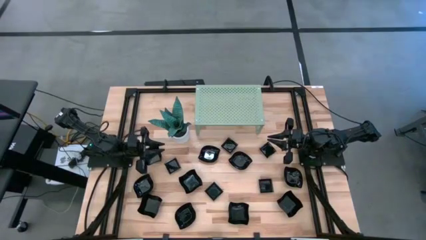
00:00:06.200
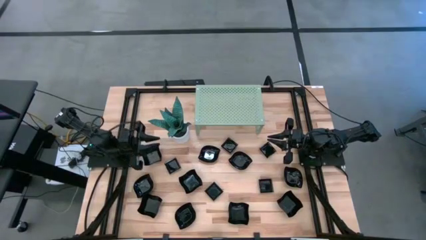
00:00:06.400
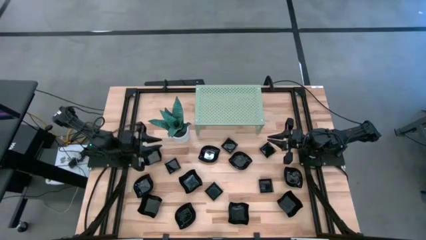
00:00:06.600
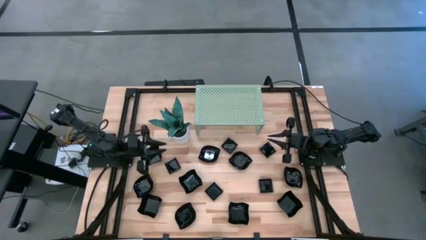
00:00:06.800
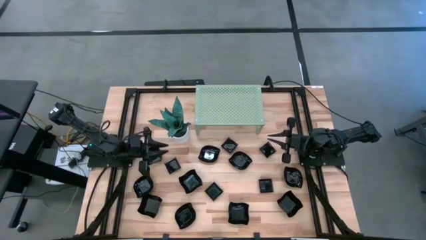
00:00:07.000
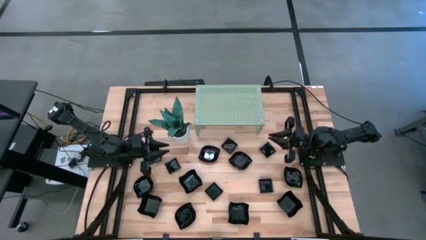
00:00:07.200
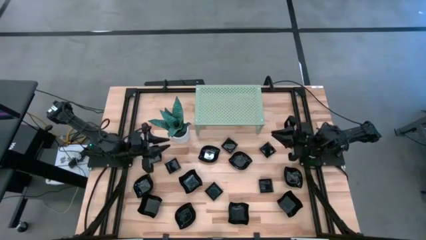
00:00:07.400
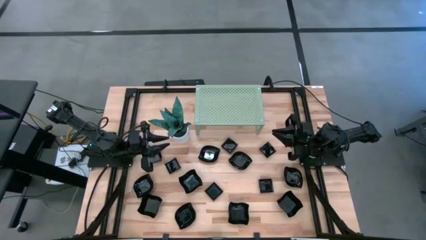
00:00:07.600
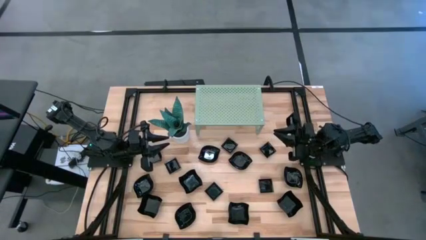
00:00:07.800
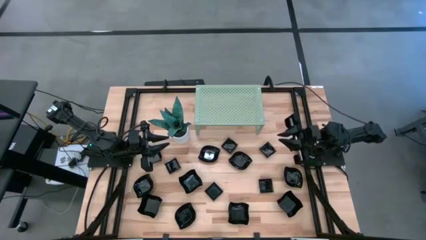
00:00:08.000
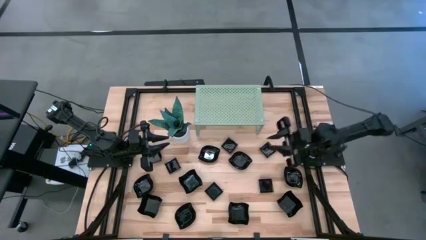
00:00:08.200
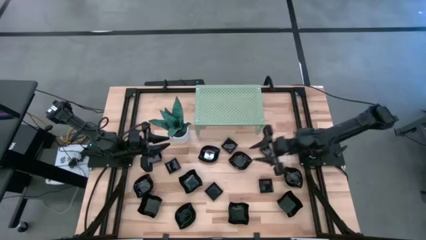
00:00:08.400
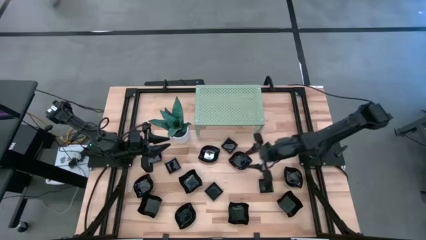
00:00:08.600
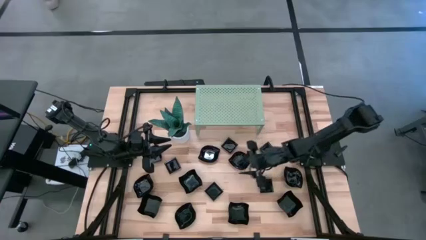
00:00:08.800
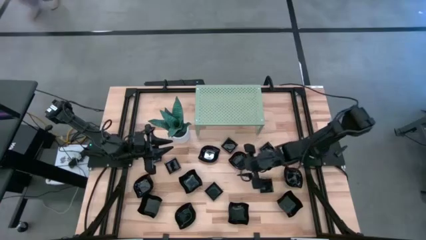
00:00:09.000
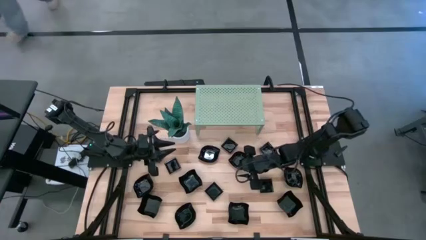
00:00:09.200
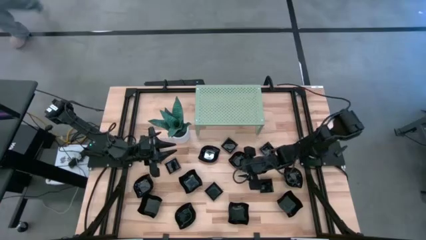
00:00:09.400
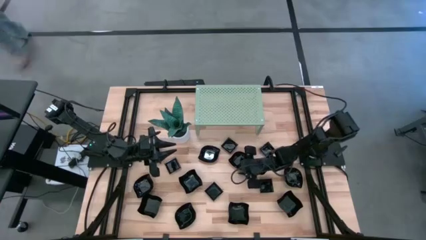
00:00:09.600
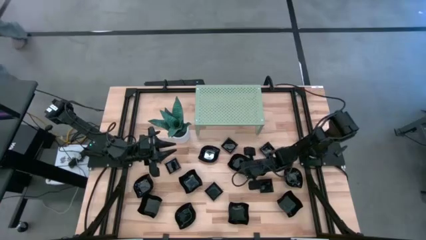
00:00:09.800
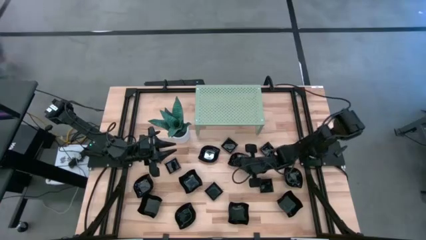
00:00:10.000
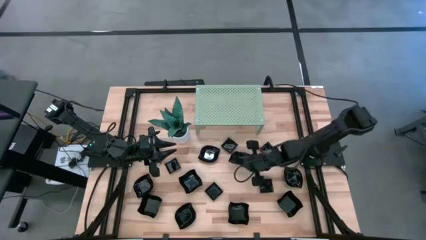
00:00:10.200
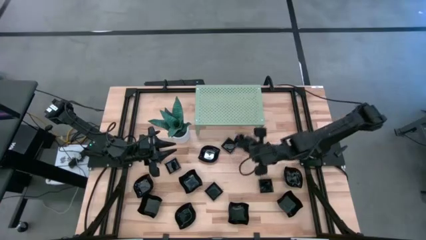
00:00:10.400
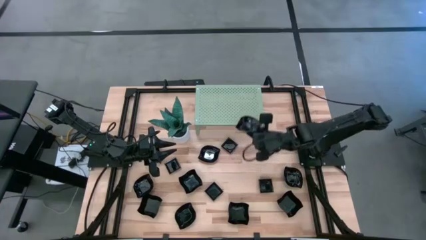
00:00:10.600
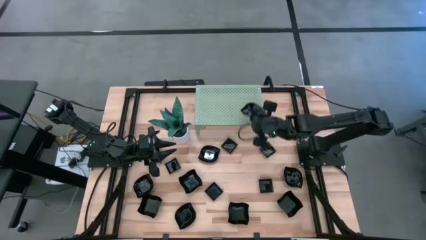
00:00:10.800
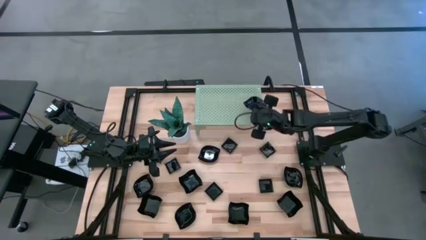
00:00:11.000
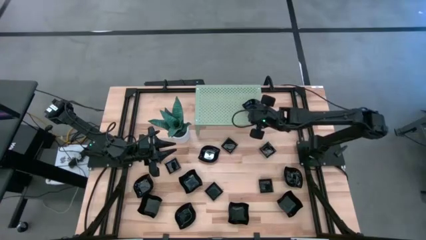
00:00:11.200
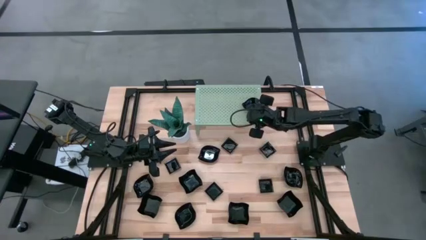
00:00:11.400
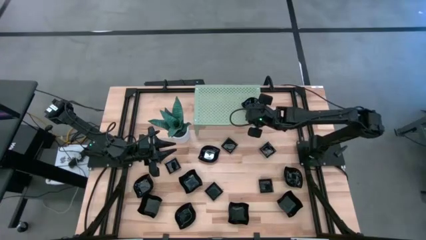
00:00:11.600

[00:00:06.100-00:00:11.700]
Task: Pick & Place Mini shaped plates
Put the leaf-shaped plate on the shelf

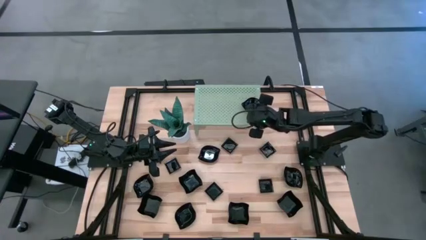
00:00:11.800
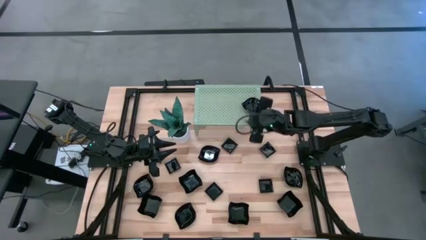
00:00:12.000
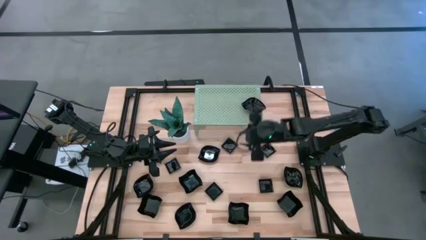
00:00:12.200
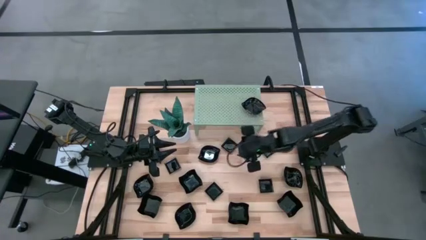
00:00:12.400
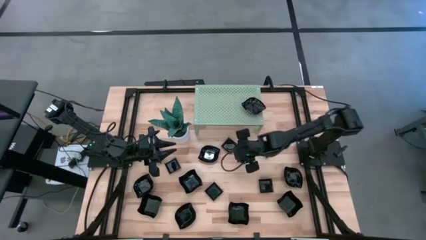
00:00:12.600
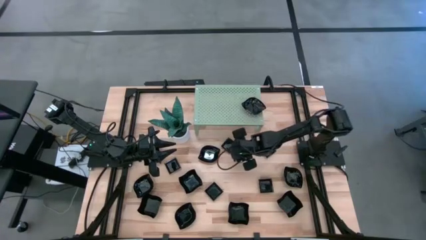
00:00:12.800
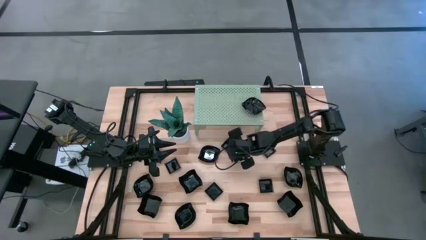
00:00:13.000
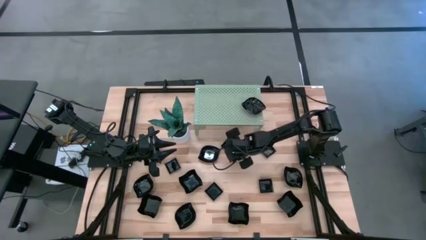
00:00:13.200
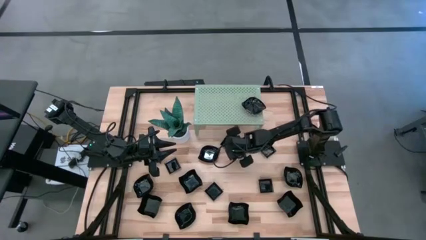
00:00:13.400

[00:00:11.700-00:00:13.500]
Put the square plate on the shelf

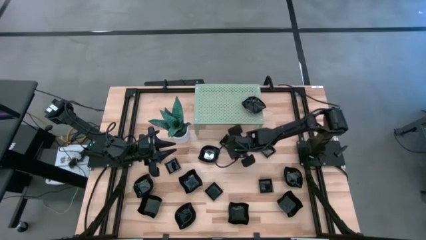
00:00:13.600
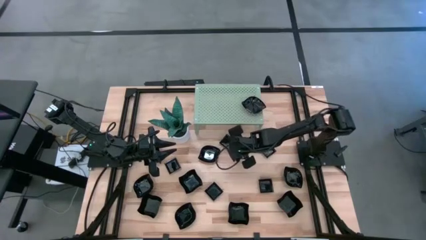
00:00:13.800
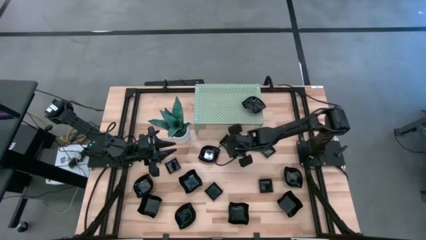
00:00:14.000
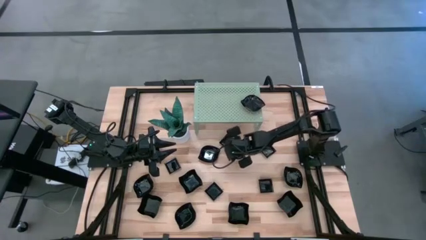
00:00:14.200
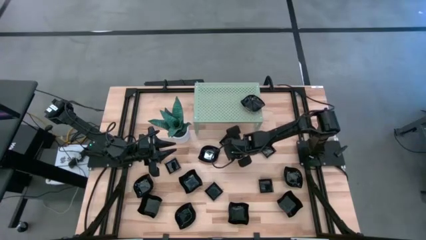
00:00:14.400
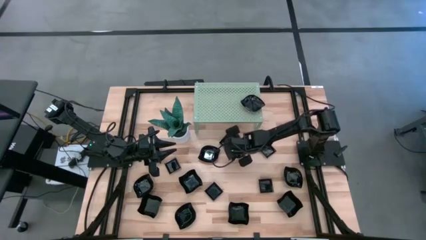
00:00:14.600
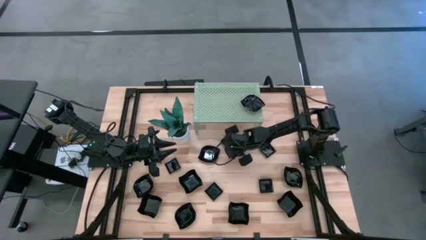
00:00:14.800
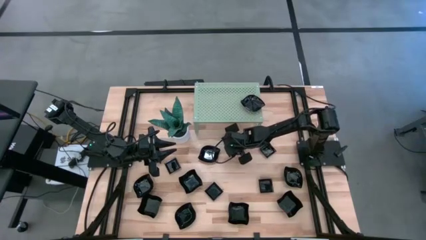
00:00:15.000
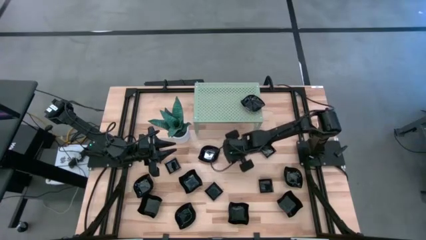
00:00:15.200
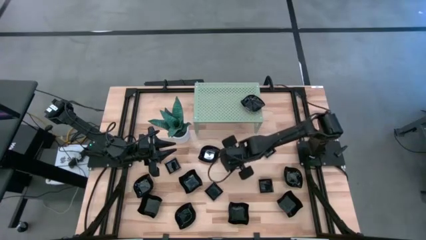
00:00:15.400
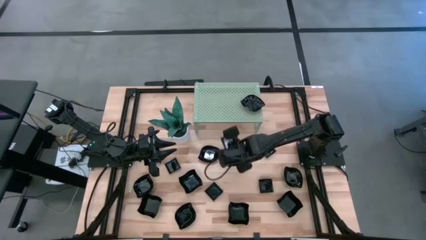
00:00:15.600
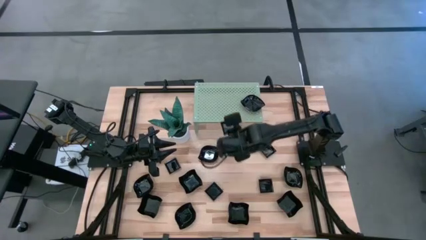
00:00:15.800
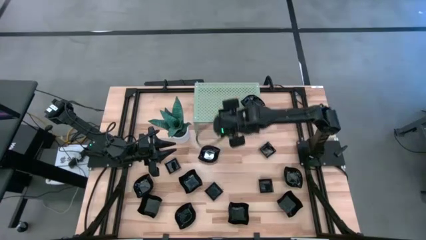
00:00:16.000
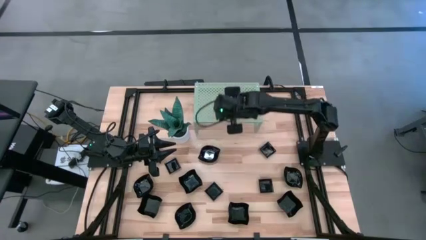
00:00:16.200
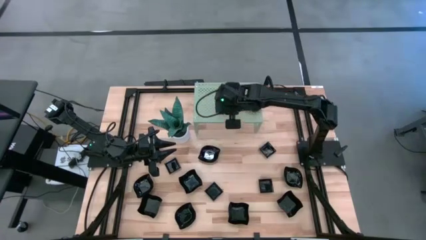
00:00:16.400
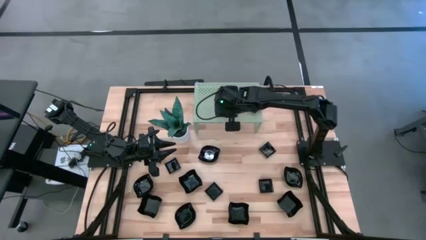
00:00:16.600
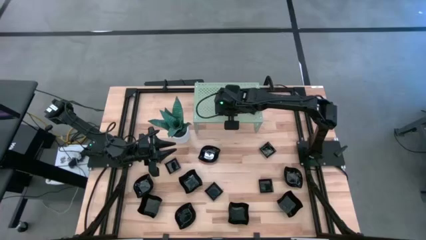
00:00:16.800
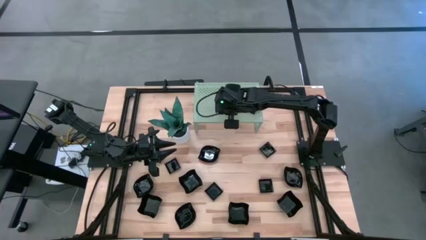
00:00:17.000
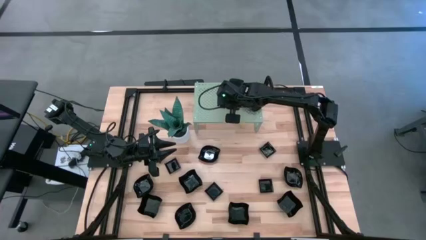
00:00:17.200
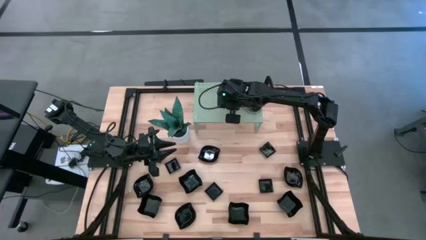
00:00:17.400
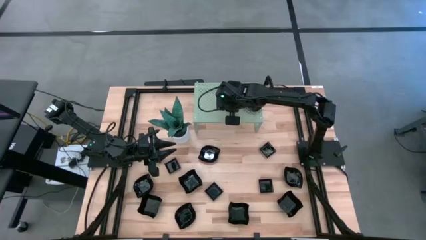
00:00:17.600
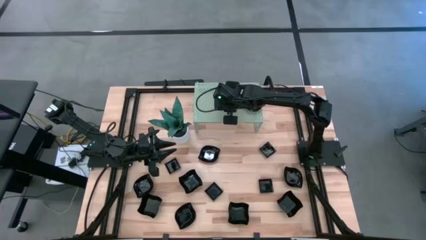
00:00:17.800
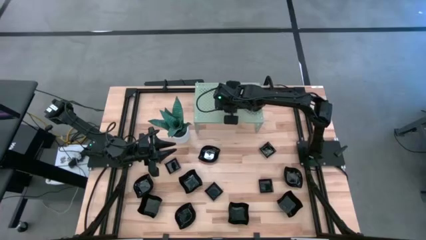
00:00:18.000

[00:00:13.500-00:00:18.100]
Put the square plate on the shelf

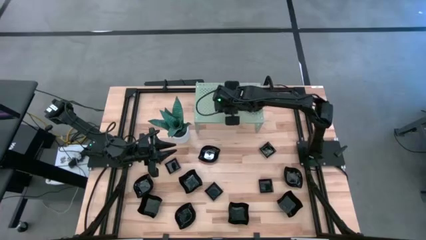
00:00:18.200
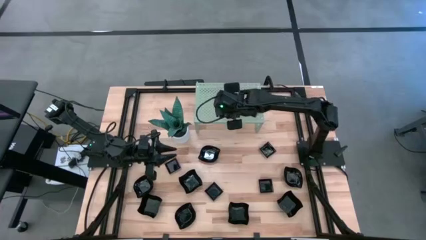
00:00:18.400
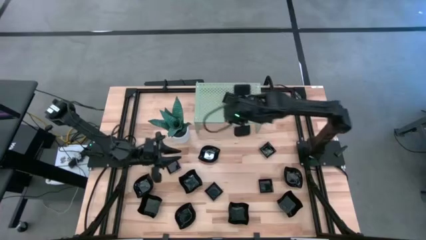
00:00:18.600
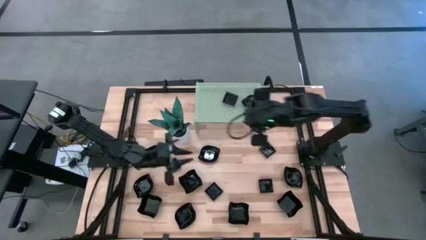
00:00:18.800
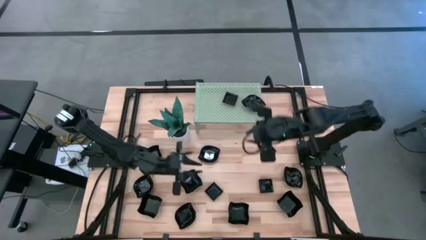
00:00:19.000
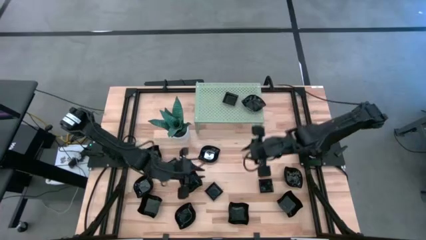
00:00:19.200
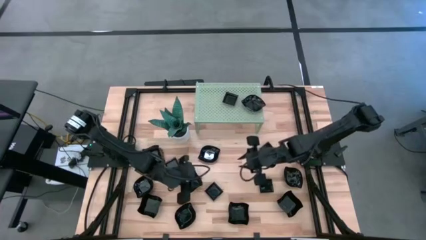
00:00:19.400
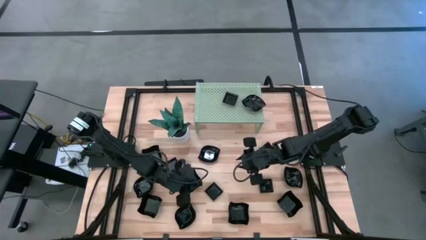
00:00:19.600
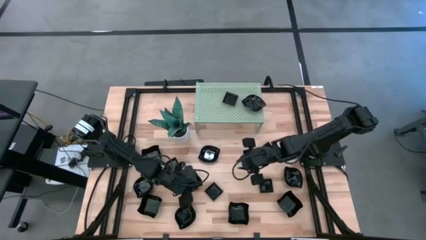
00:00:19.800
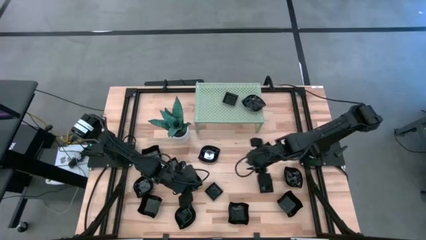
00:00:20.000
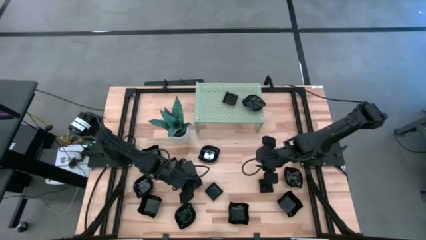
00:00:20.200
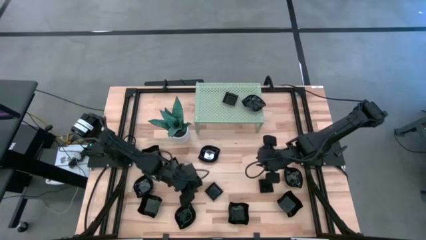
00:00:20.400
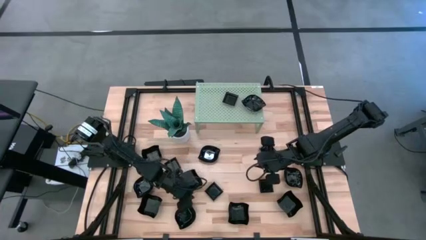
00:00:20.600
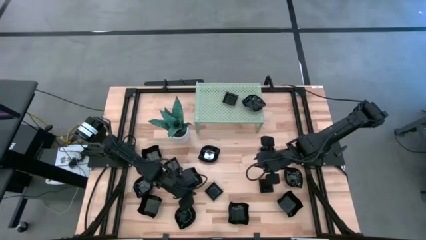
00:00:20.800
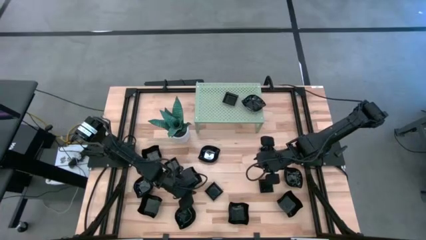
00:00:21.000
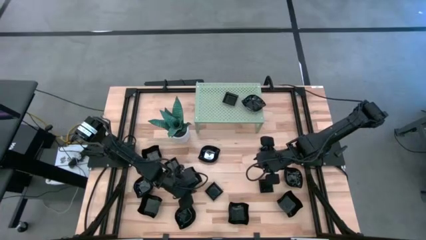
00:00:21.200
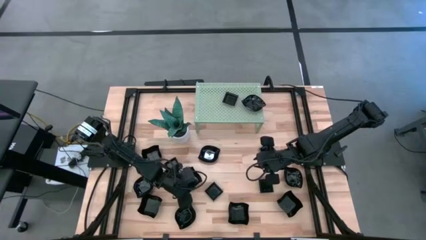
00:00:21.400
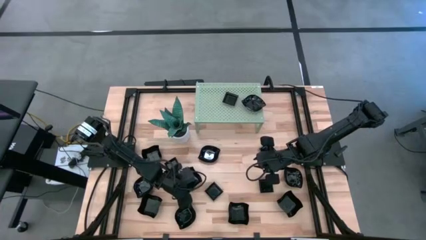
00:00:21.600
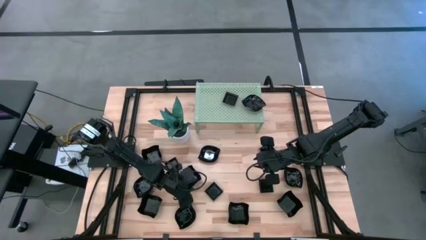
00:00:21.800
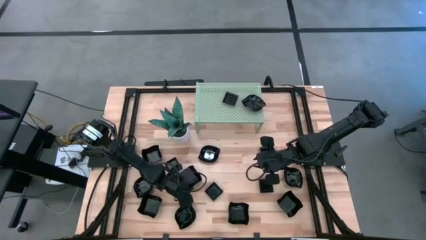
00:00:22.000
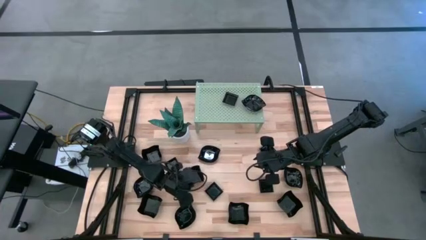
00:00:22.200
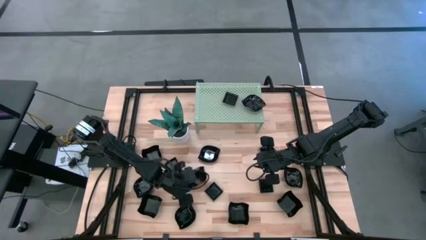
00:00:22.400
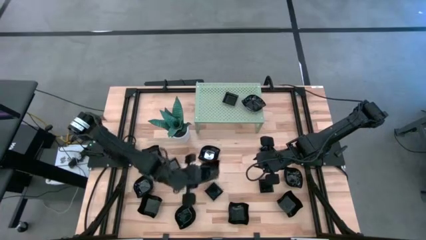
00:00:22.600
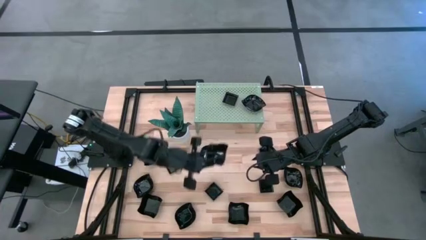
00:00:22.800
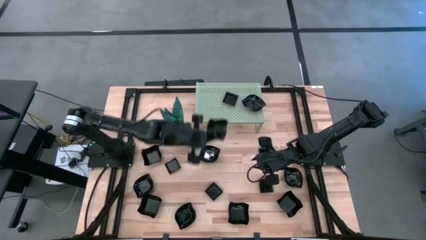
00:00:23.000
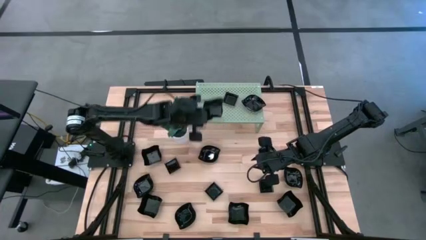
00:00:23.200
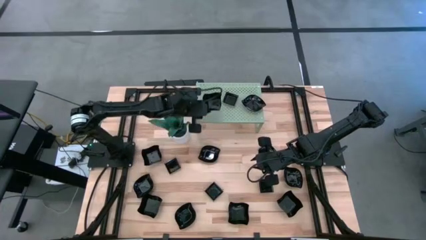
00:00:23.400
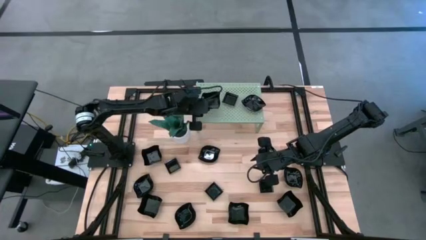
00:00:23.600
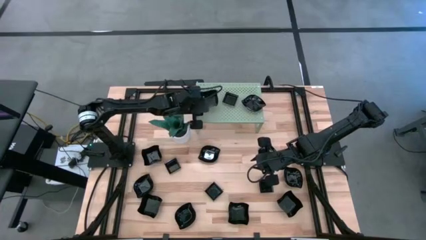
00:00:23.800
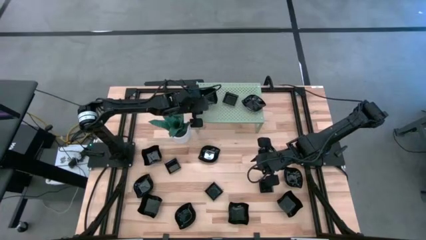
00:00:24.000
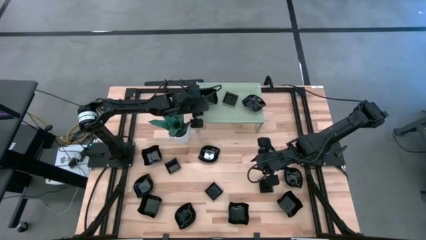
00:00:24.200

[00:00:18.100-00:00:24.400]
Put the distorted square plate on the shelf
